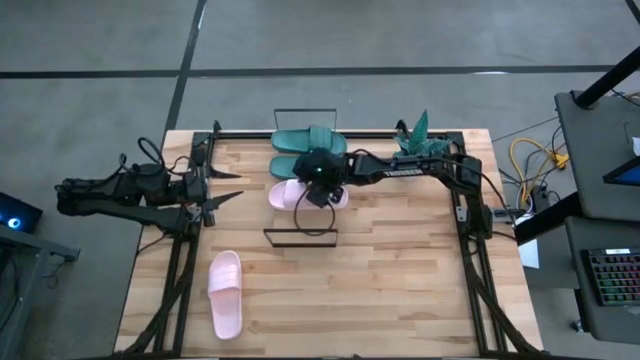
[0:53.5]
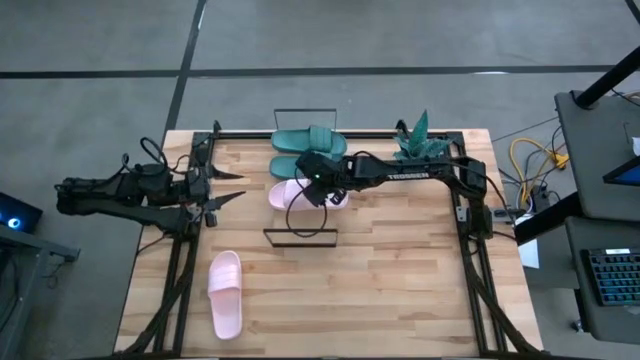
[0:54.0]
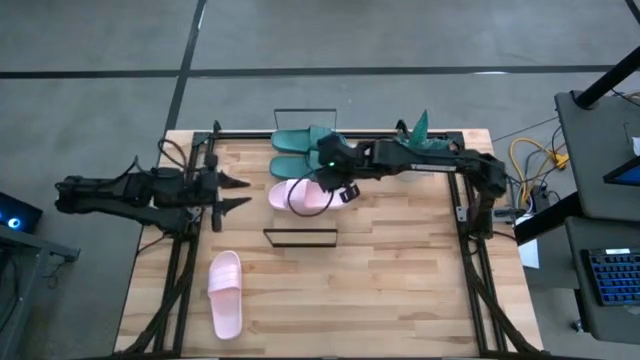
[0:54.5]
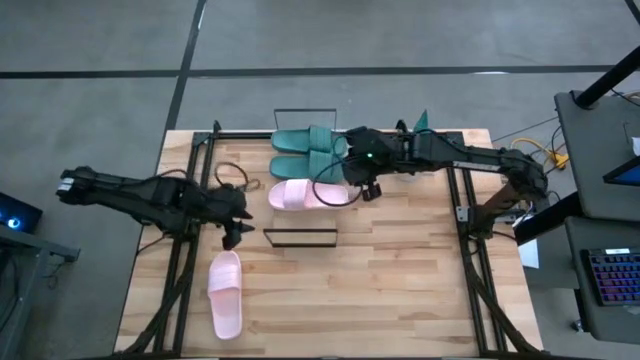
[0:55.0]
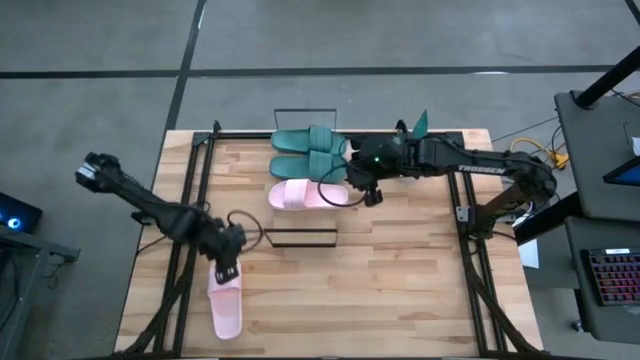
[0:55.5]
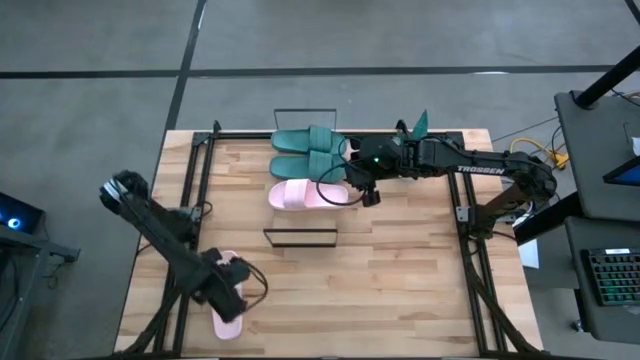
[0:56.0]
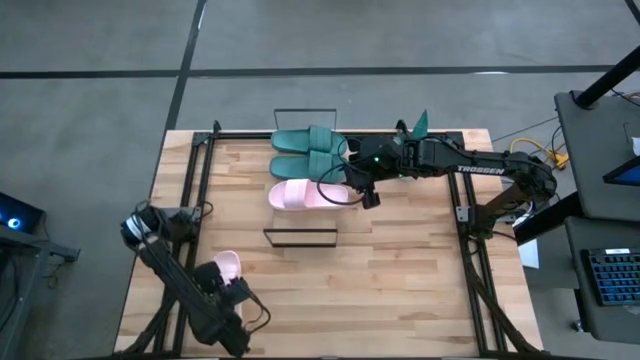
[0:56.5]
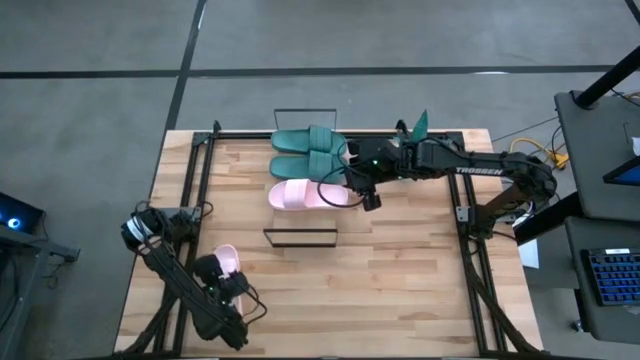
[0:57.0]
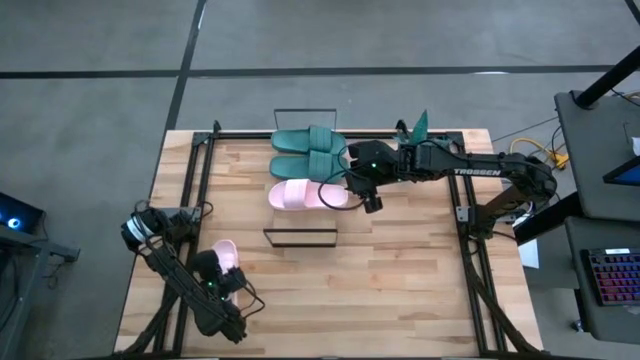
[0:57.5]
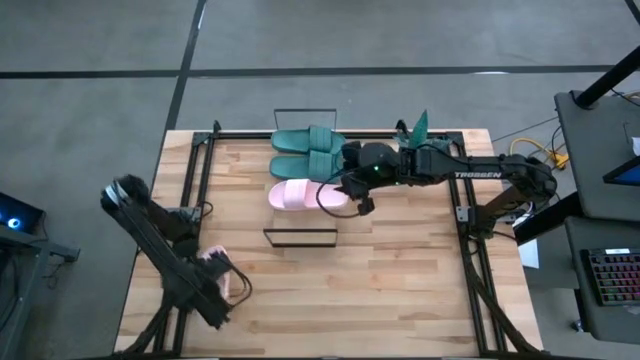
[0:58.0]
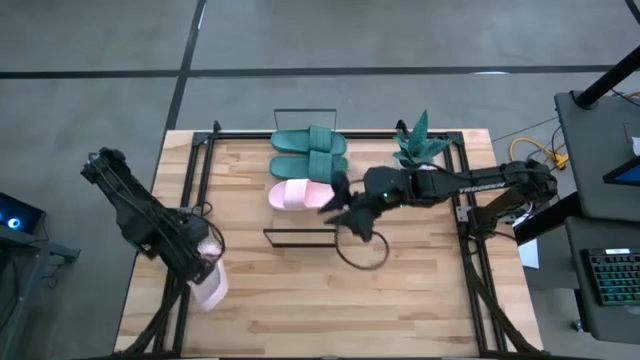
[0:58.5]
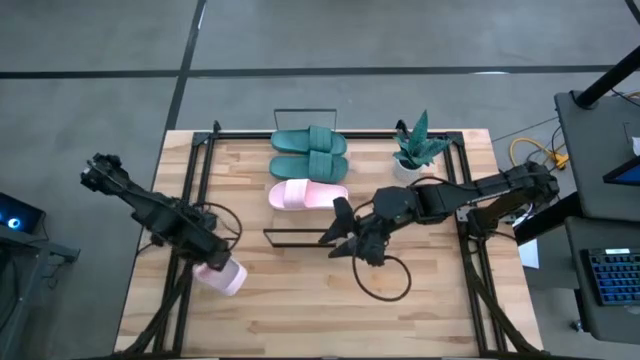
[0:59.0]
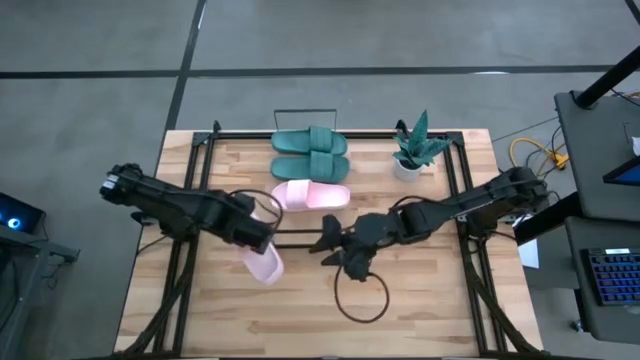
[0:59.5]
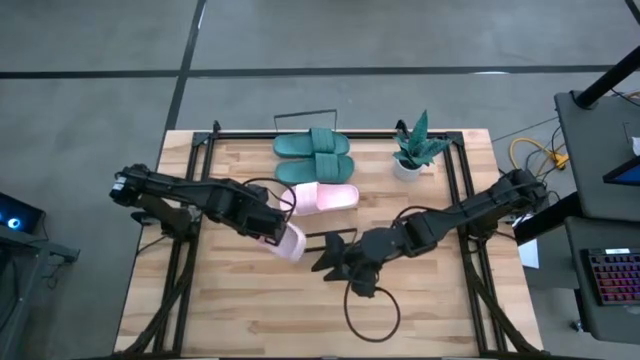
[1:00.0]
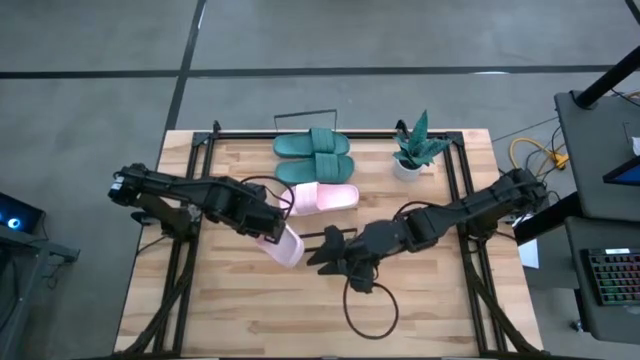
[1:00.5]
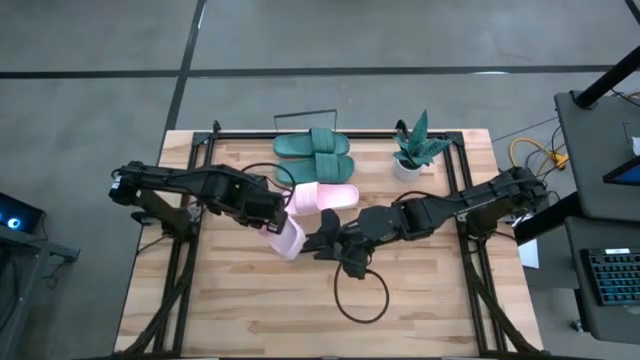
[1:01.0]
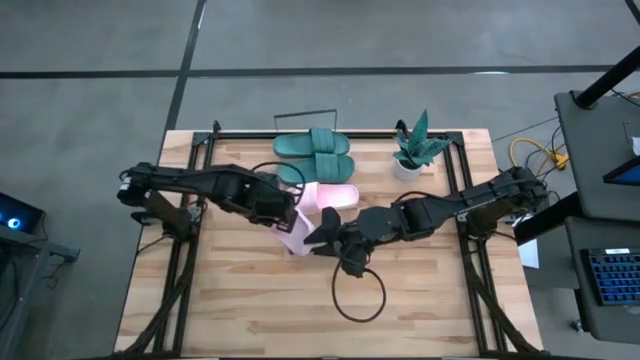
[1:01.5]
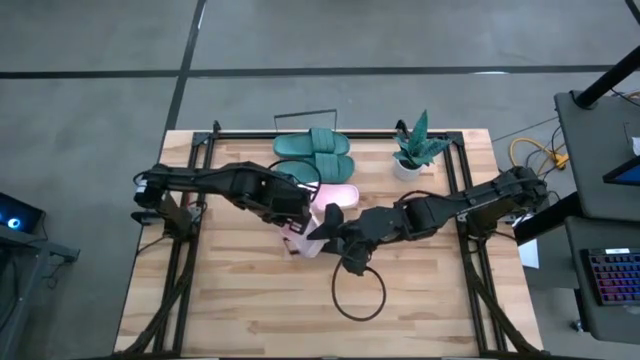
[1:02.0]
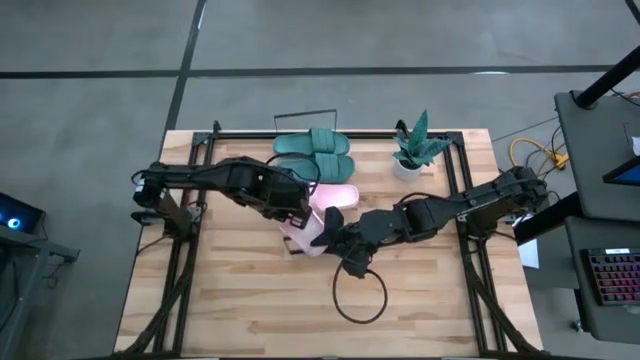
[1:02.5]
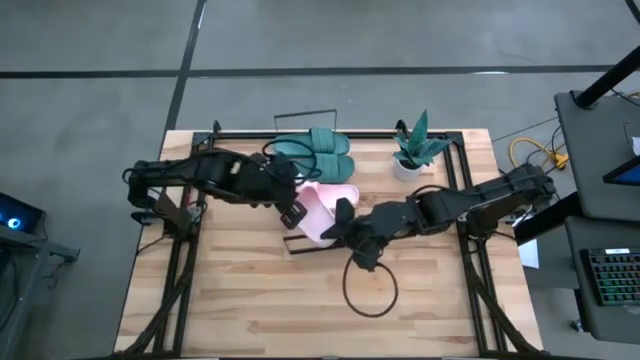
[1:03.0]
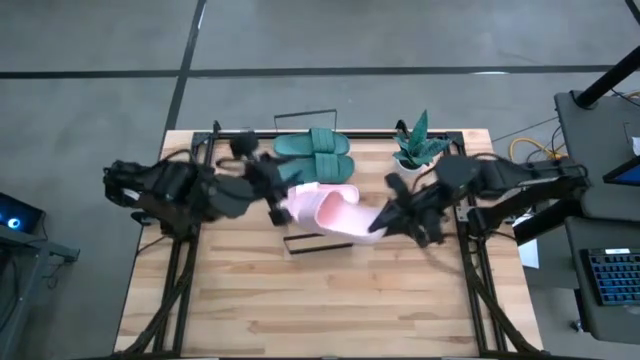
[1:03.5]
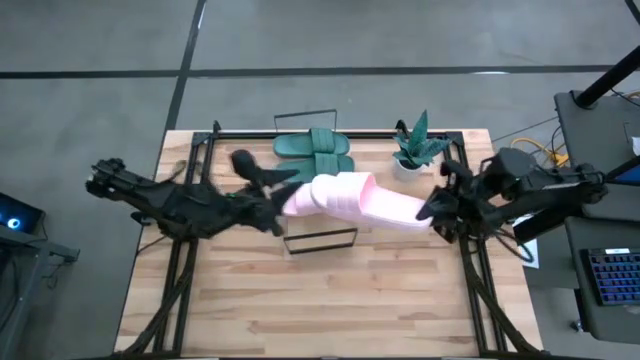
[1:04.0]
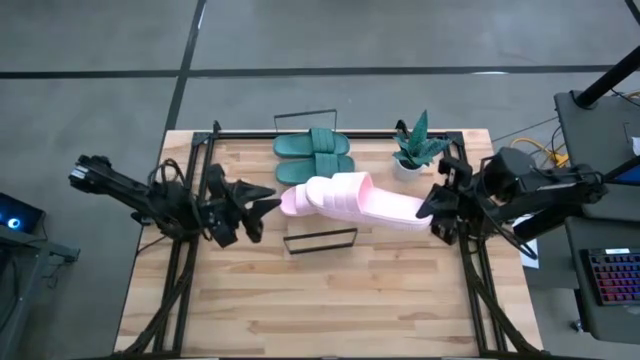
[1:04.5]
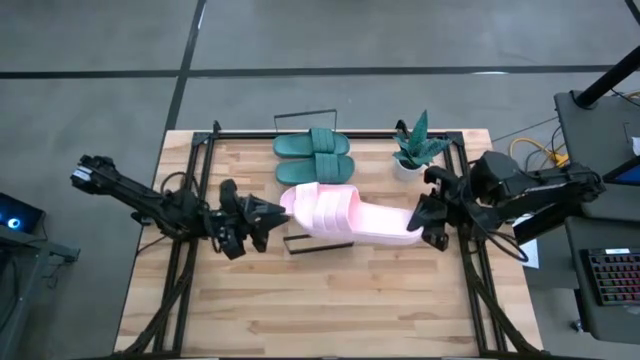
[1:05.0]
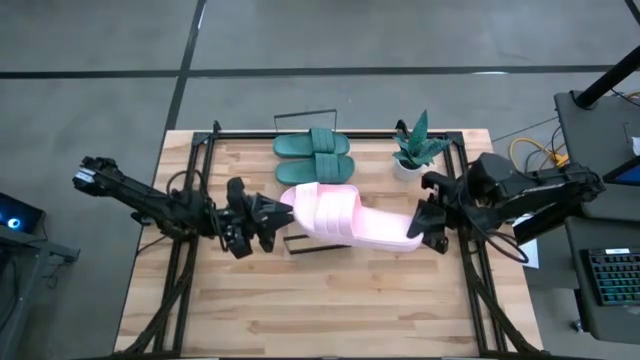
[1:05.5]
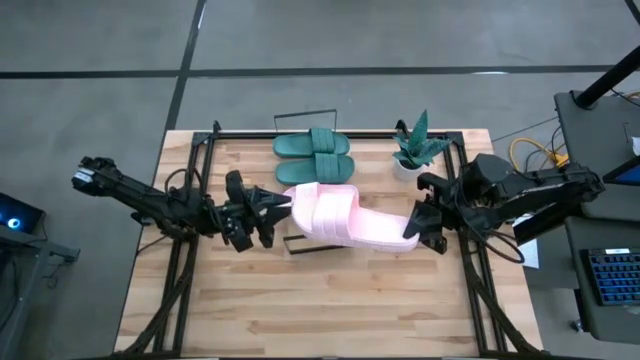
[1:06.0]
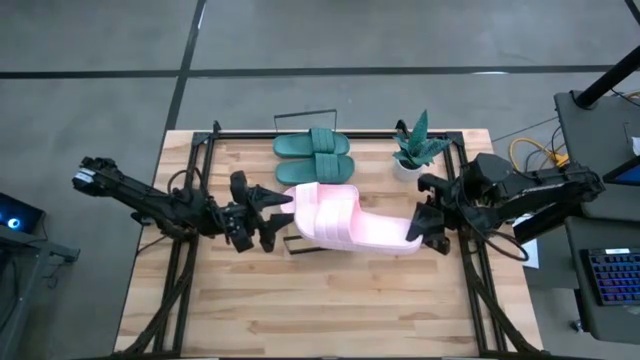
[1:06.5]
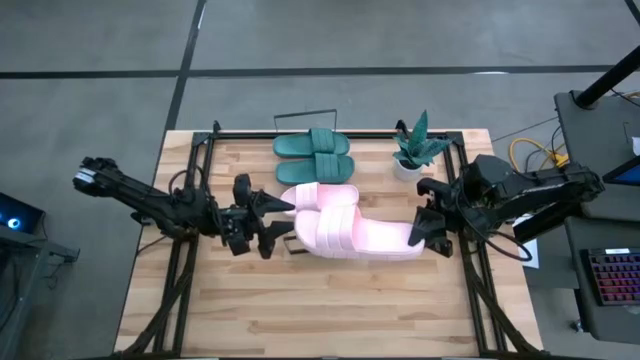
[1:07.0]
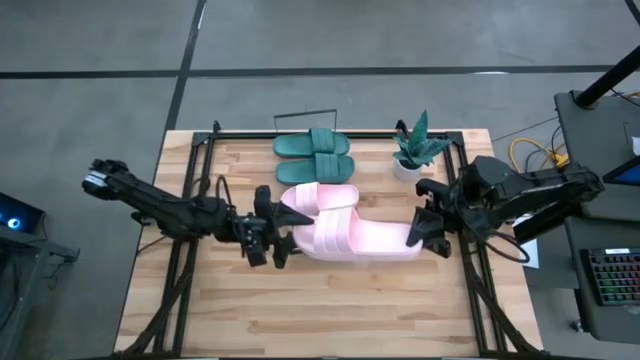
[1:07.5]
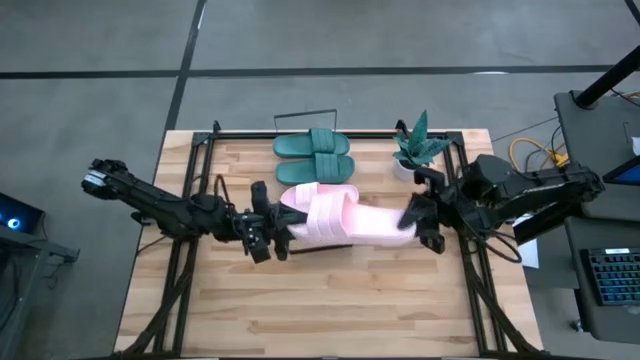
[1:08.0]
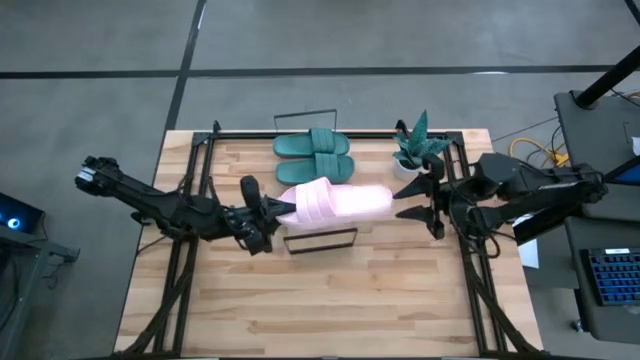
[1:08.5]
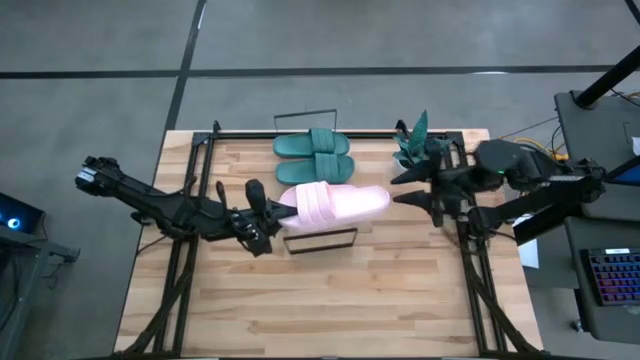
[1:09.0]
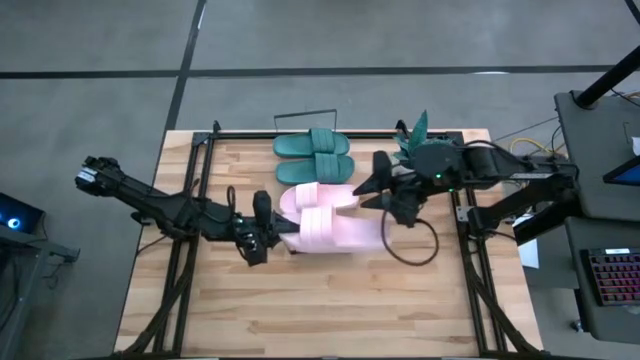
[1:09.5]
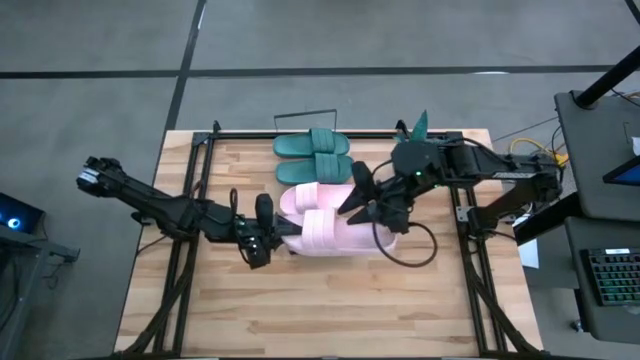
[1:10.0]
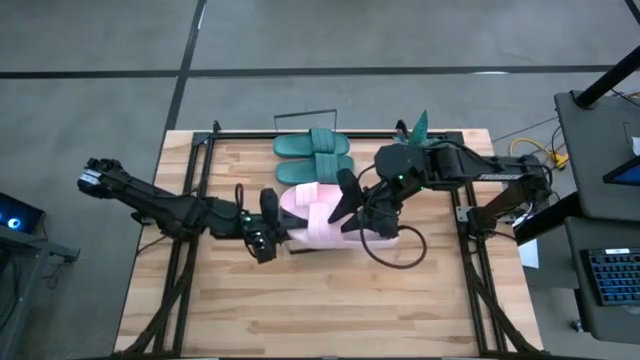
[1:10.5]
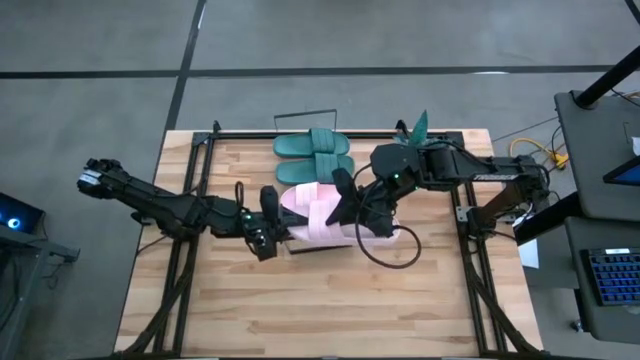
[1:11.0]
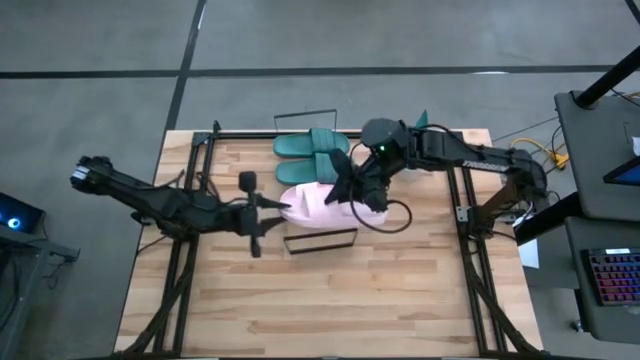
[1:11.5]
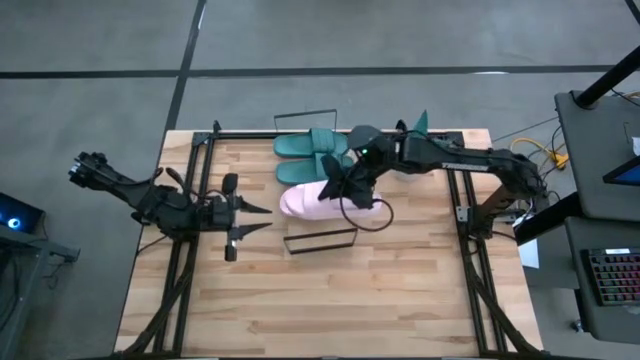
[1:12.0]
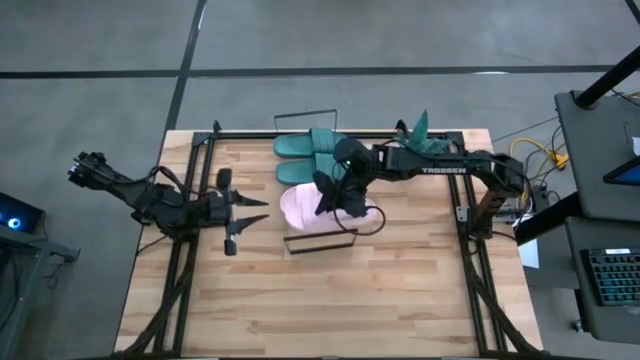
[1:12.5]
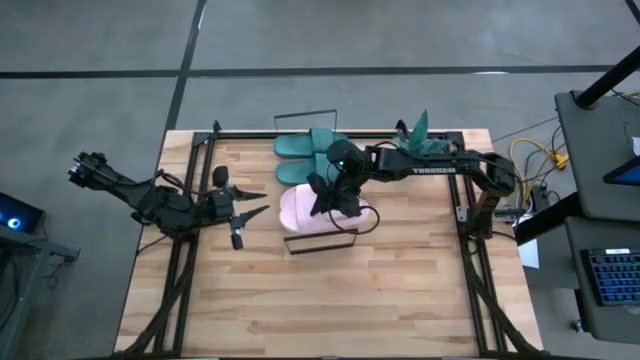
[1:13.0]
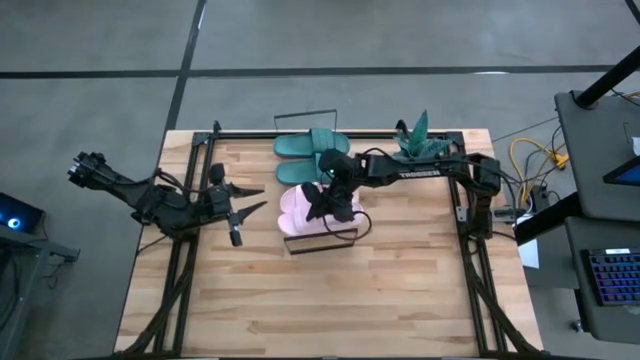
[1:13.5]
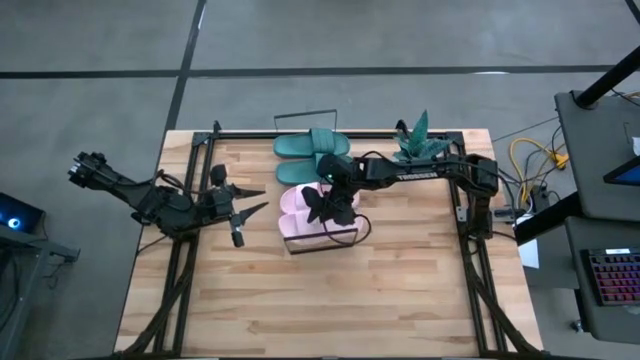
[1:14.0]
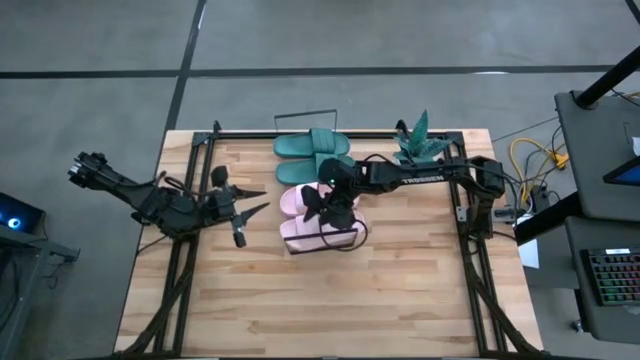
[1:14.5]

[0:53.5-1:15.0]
Task: Pick and place slides into the shelf
Put the pink slides on the shelf
